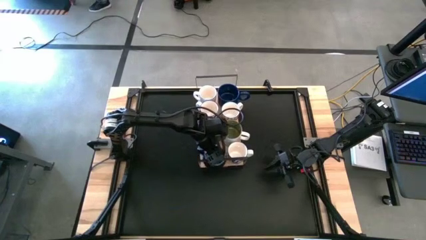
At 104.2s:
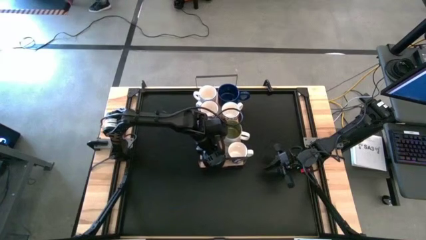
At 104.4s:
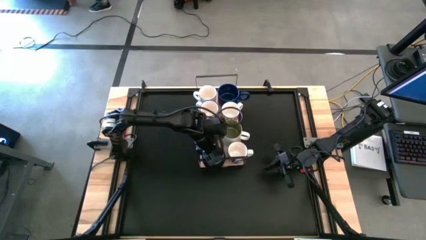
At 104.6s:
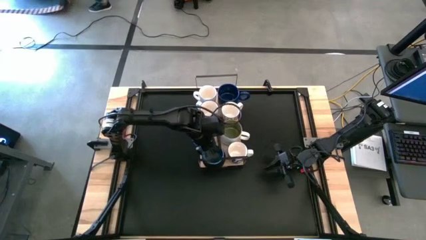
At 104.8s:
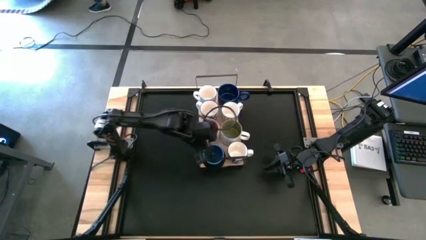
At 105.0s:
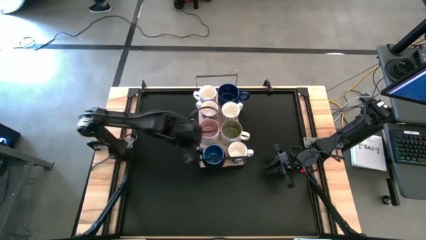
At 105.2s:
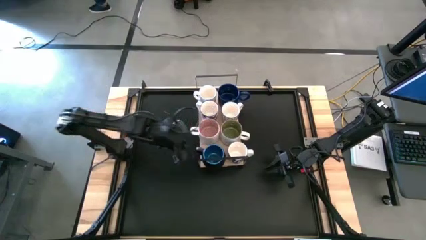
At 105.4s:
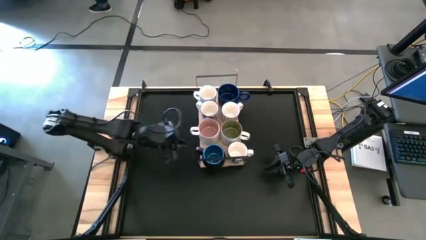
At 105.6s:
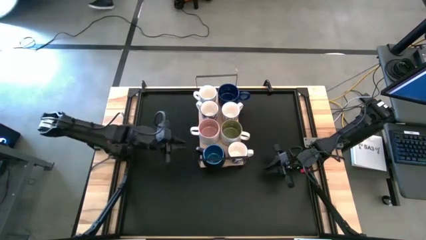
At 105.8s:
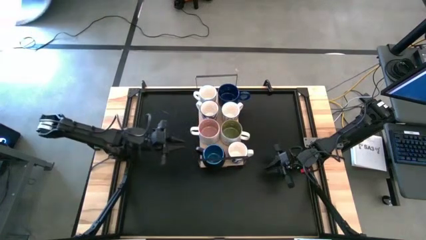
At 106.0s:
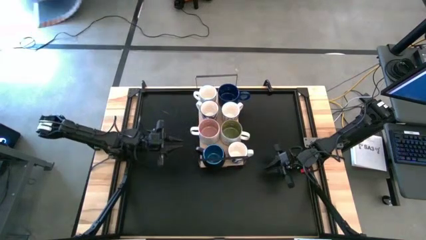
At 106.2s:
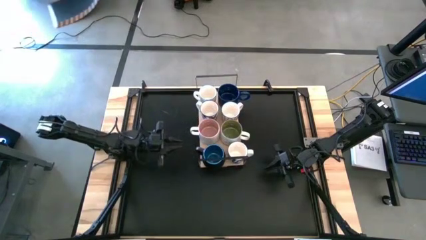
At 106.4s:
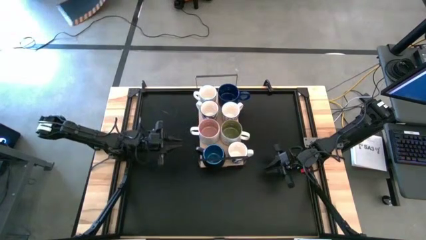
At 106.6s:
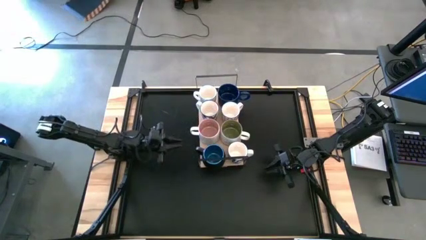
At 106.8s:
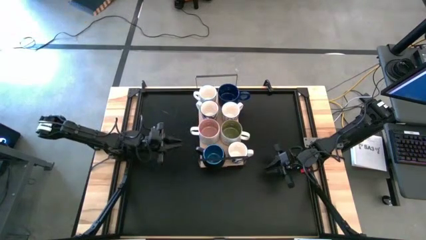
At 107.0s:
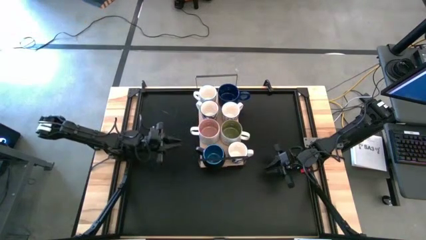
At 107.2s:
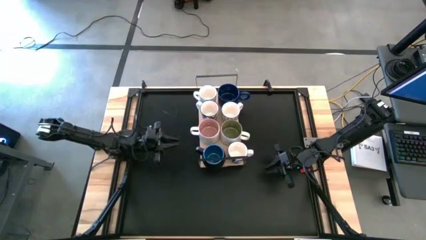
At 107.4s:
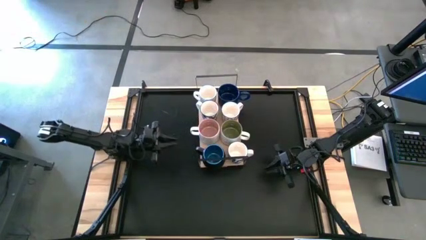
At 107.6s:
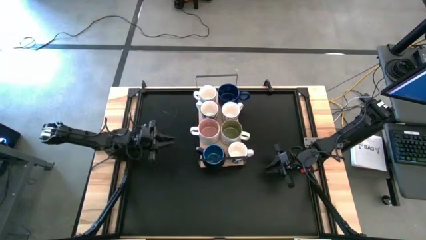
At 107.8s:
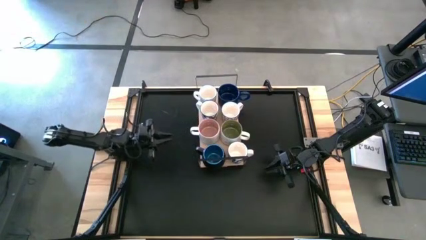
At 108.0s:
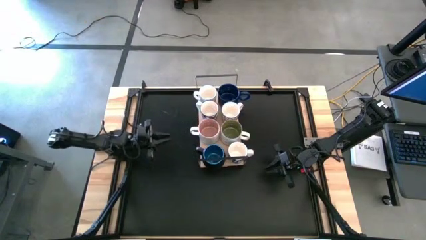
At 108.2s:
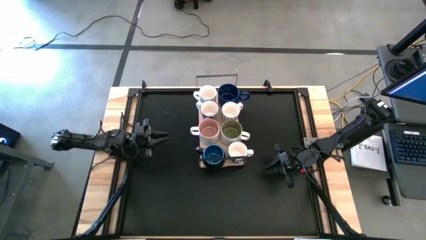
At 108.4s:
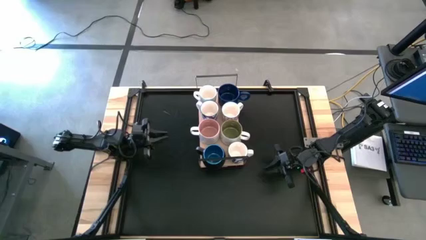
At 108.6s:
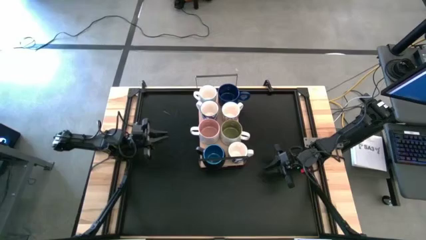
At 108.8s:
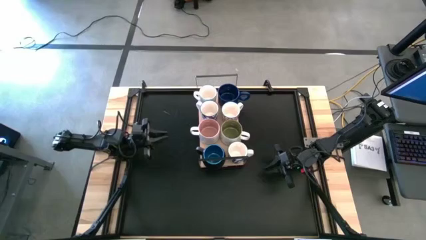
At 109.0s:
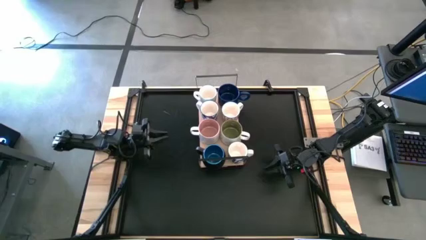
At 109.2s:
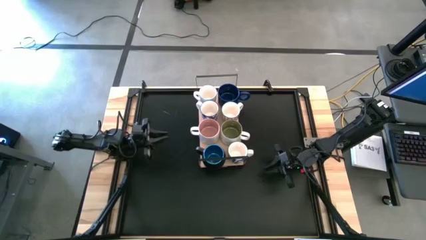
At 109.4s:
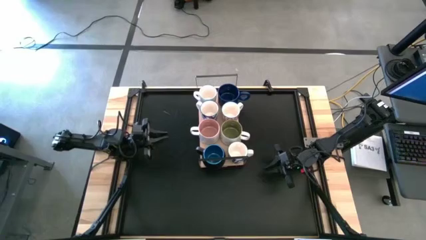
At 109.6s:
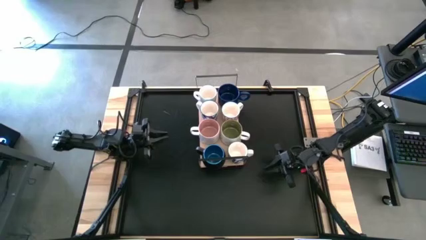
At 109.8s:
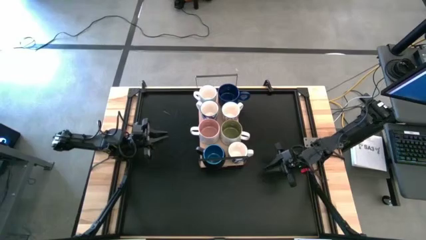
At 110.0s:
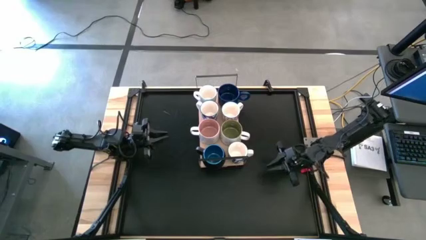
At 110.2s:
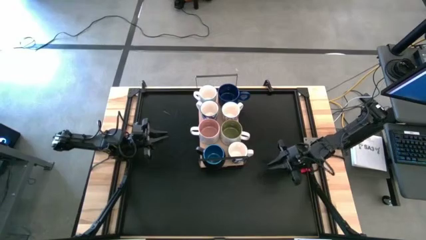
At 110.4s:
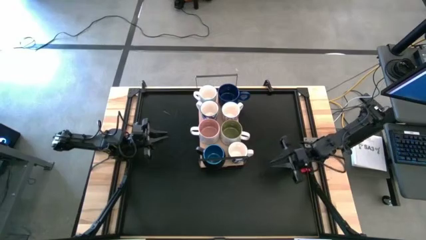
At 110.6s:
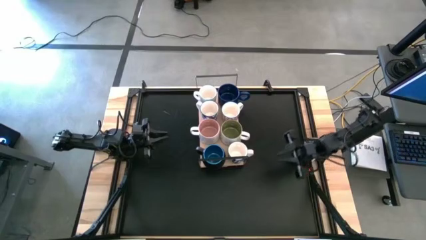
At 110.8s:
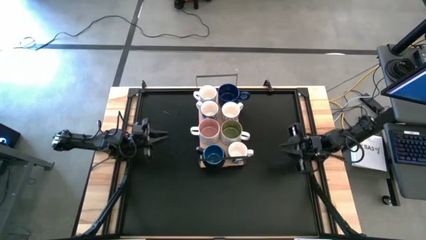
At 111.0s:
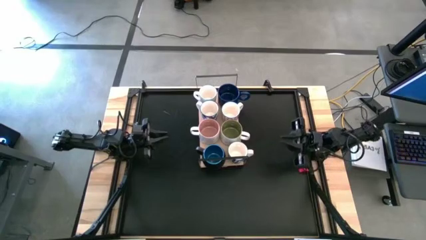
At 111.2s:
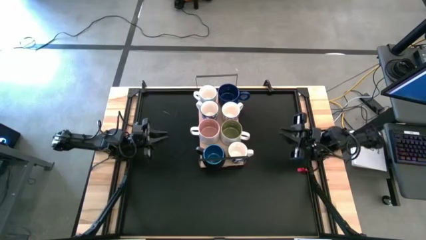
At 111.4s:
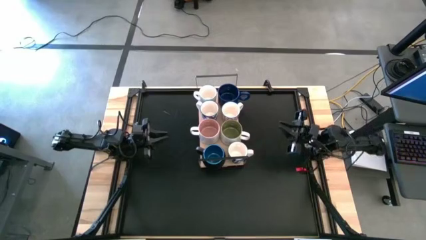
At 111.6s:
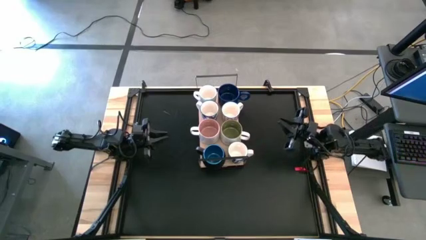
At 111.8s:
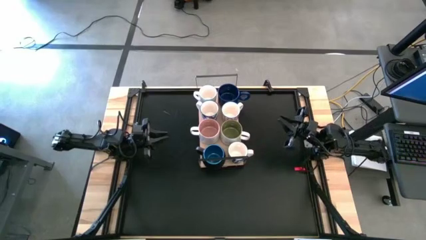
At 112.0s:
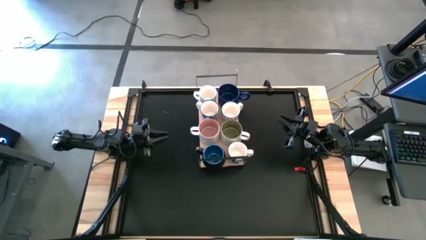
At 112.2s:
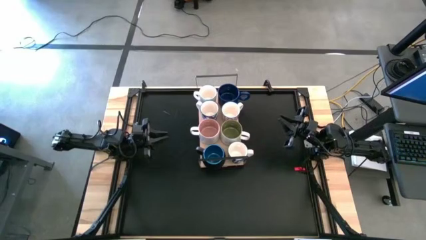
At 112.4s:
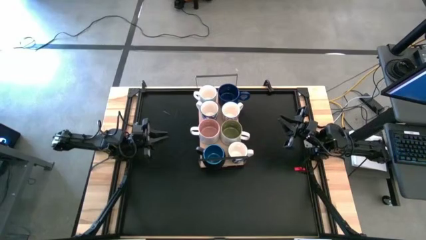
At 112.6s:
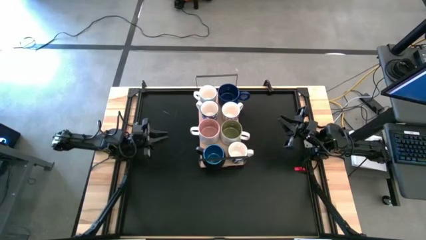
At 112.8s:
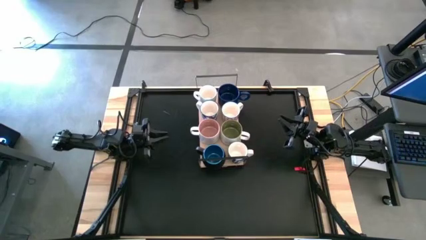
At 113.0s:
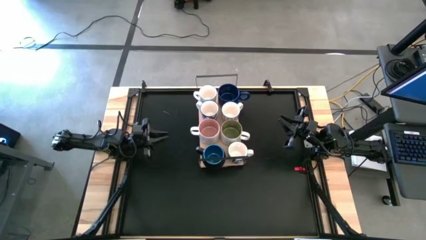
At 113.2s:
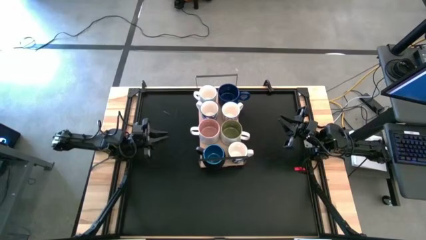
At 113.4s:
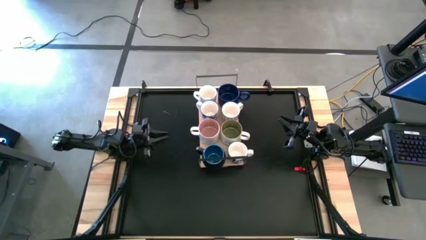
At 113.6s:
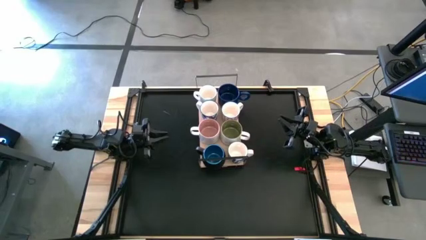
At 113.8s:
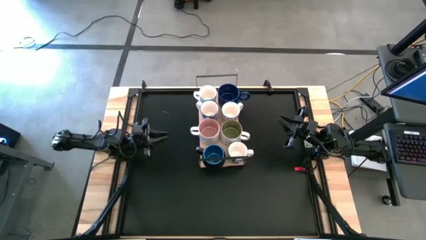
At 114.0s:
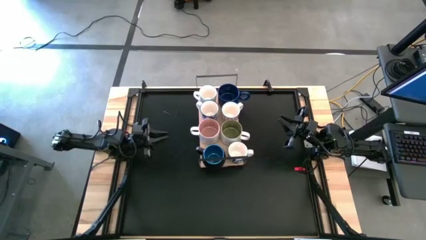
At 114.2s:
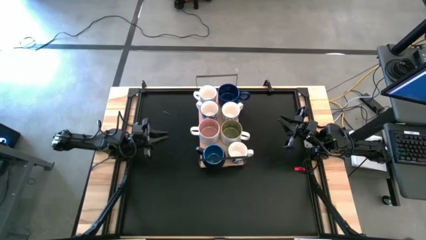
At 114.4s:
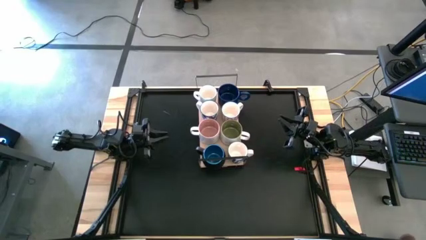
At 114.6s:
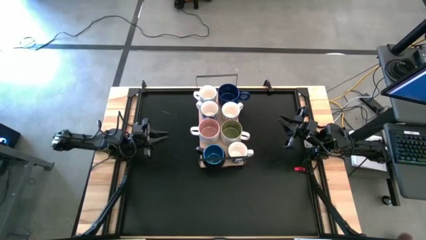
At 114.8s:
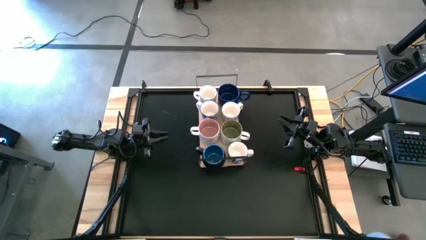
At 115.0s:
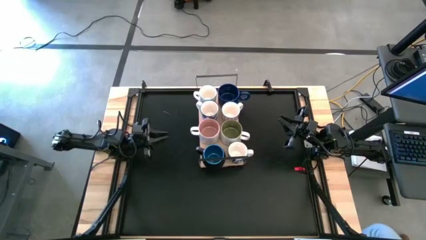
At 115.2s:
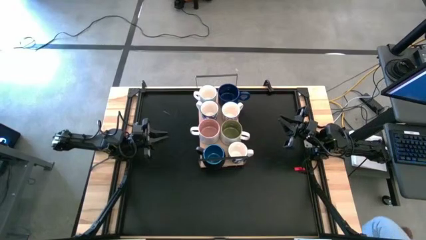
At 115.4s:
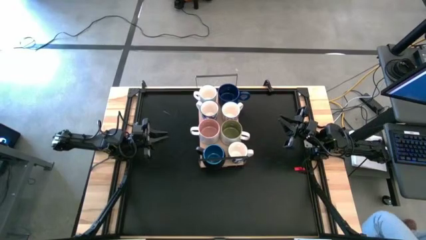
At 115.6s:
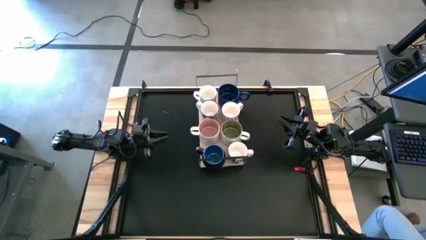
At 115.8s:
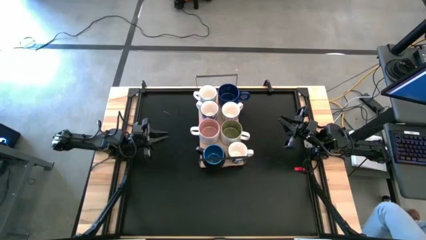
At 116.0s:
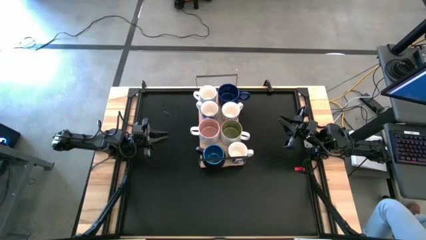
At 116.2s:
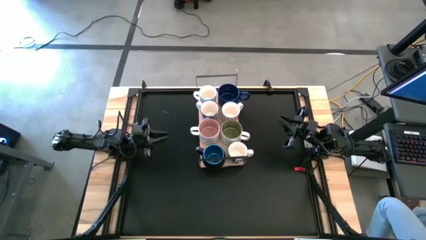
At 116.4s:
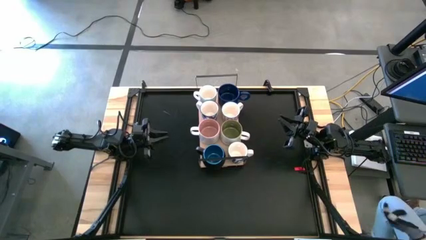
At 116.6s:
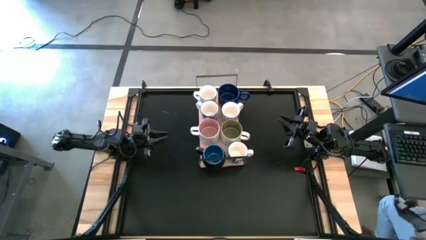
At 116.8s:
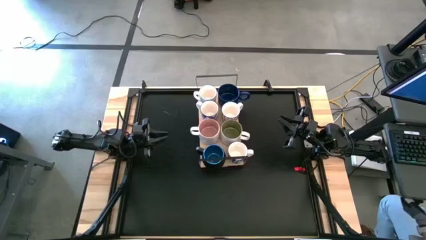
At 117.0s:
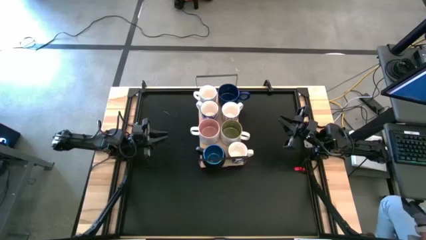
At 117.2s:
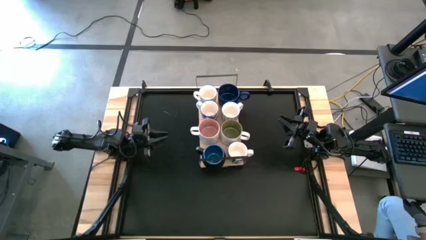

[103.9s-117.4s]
Task: Place coffee mugs
Return to Home Position

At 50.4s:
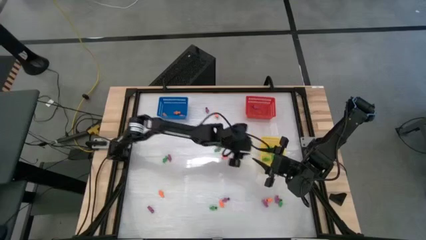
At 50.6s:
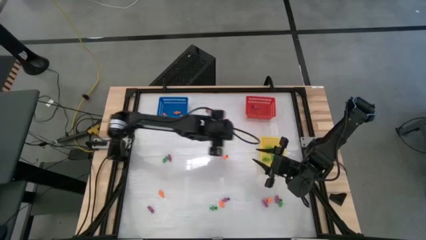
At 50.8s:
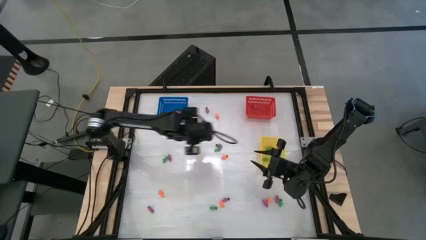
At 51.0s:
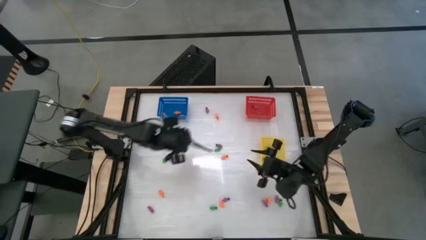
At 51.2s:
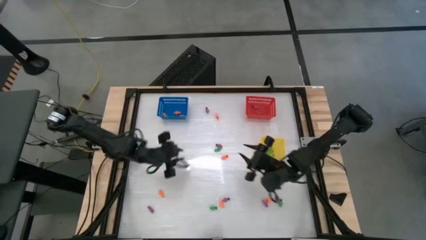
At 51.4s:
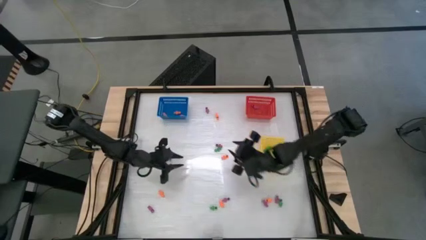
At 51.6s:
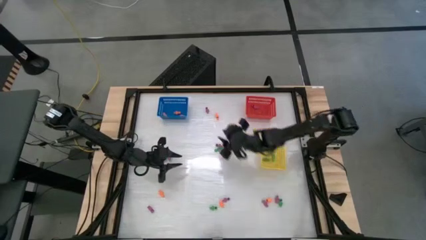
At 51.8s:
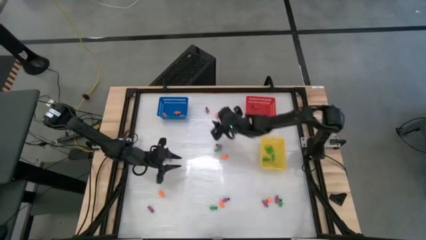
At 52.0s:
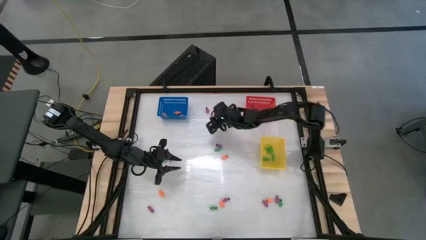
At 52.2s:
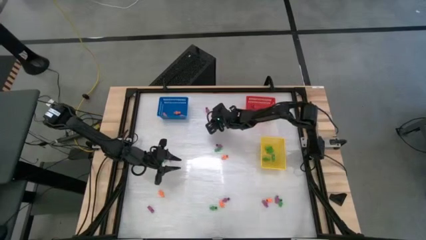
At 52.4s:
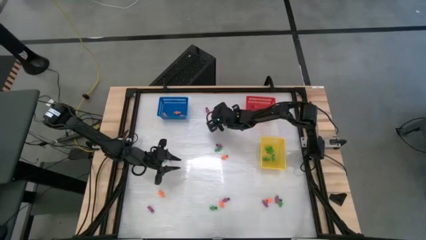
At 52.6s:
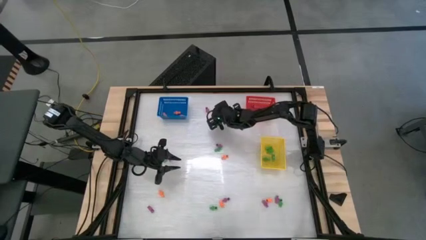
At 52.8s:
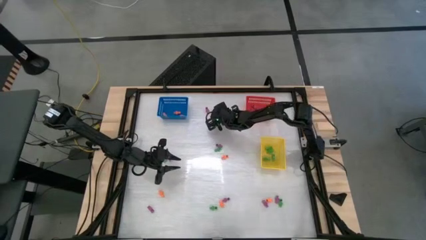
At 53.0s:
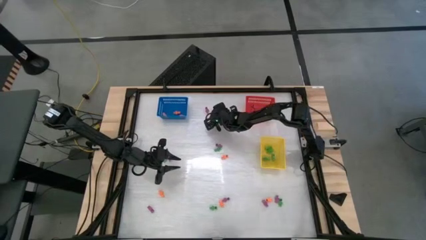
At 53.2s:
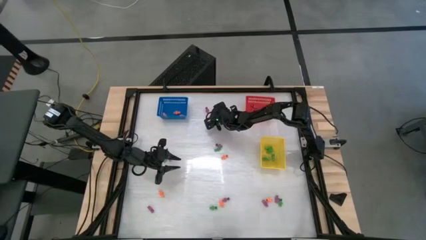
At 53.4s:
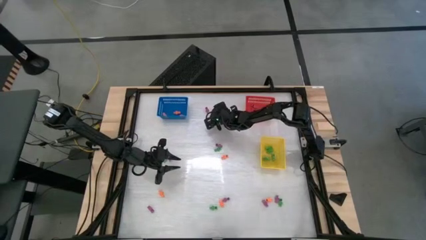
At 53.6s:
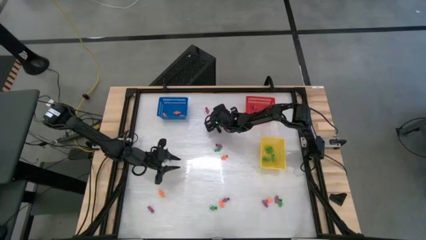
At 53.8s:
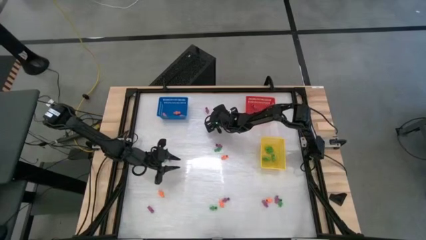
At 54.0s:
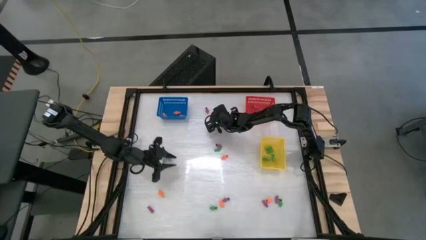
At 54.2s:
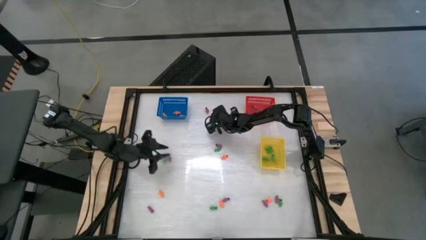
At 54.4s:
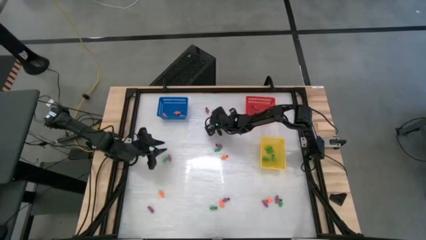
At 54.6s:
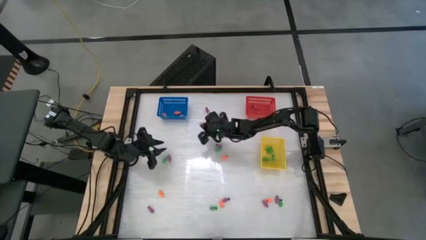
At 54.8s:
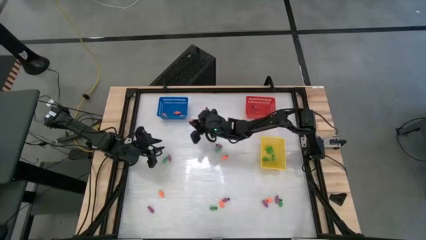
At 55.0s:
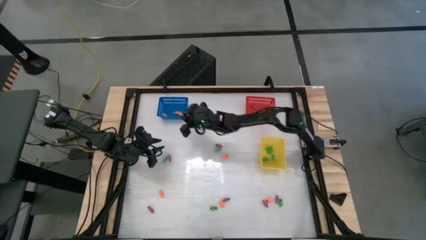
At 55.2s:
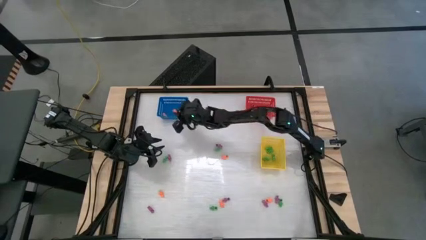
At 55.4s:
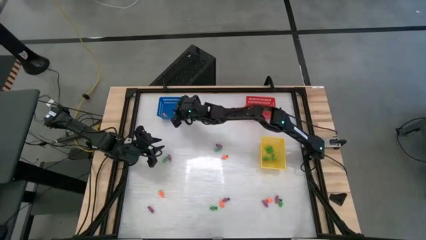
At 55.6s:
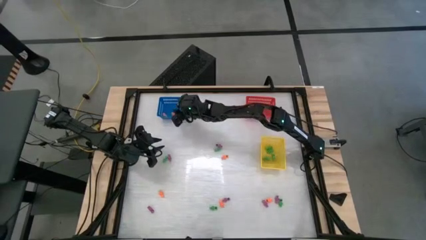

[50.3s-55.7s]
Task: Sort Halloween decoration
Put the orange skeleton toy into the blue bin
